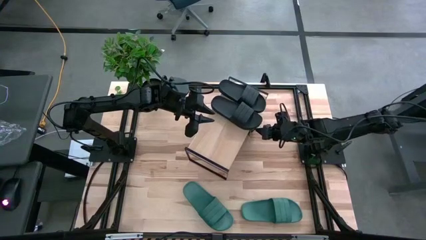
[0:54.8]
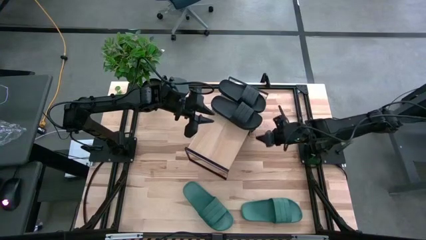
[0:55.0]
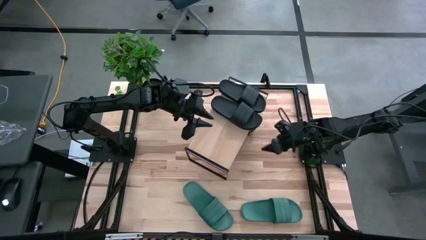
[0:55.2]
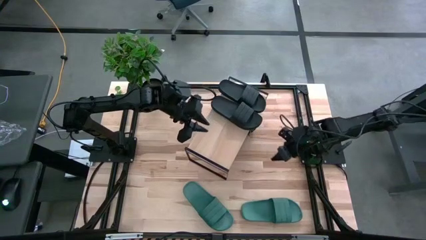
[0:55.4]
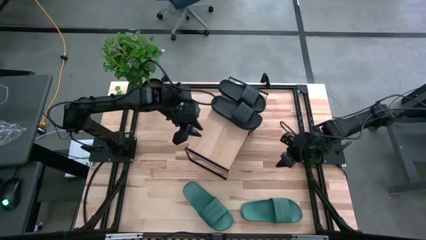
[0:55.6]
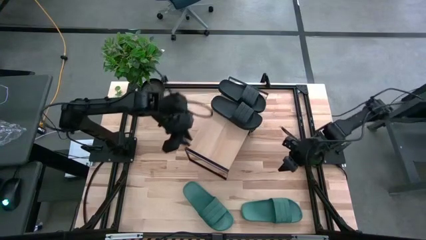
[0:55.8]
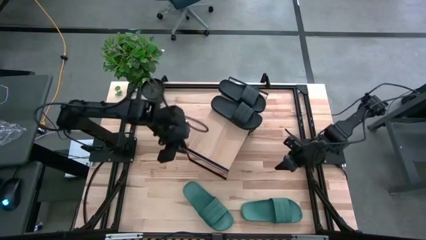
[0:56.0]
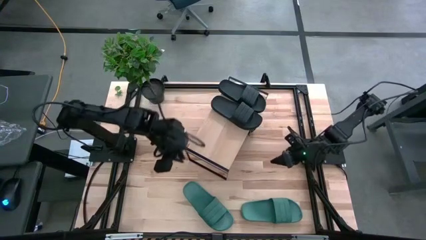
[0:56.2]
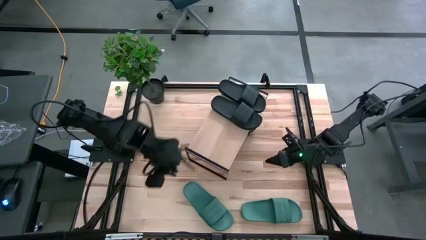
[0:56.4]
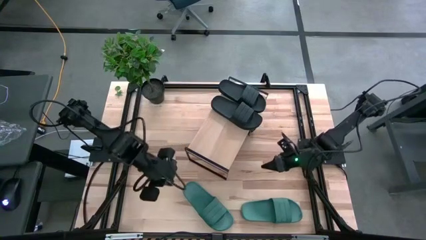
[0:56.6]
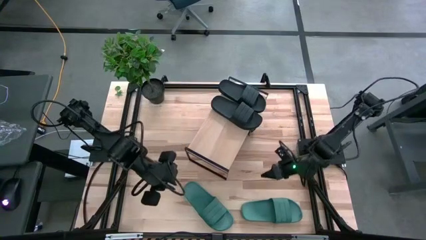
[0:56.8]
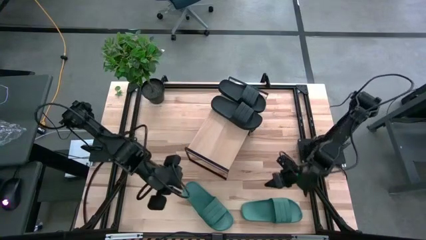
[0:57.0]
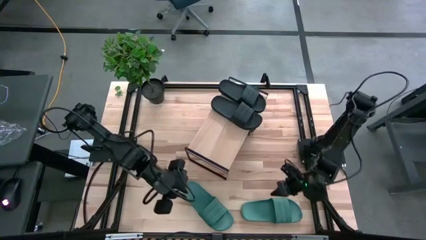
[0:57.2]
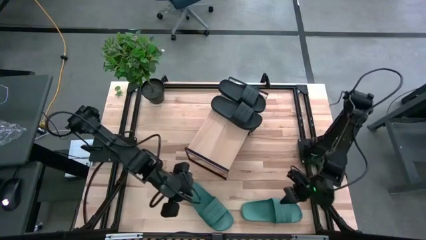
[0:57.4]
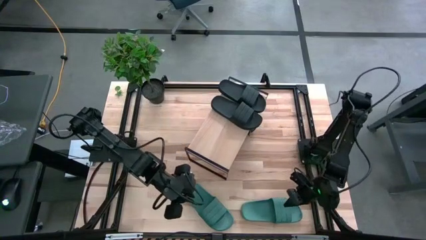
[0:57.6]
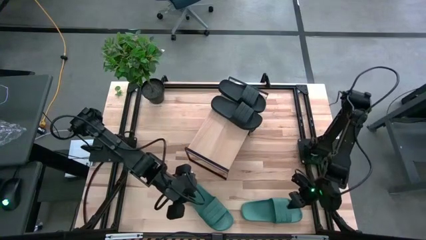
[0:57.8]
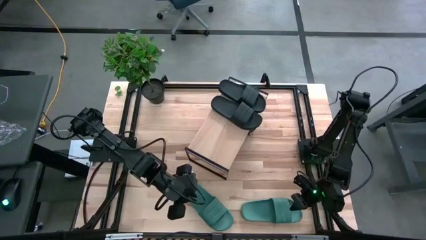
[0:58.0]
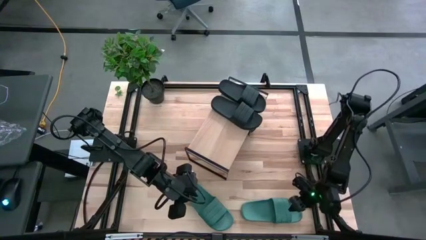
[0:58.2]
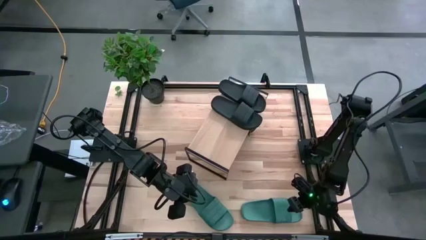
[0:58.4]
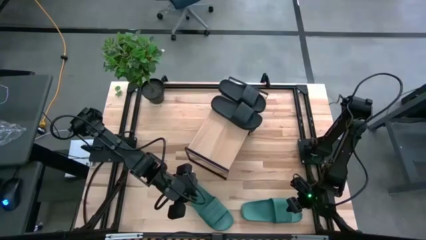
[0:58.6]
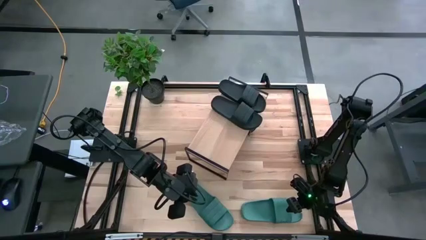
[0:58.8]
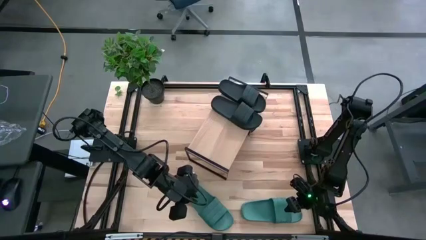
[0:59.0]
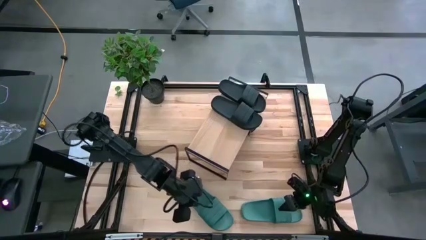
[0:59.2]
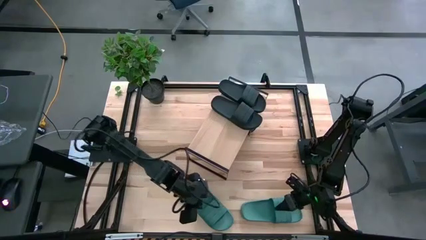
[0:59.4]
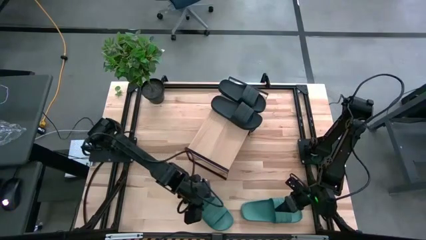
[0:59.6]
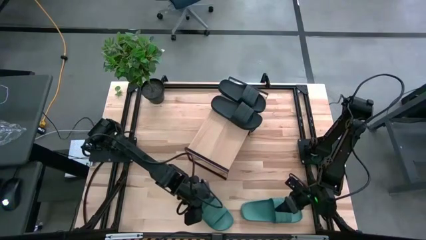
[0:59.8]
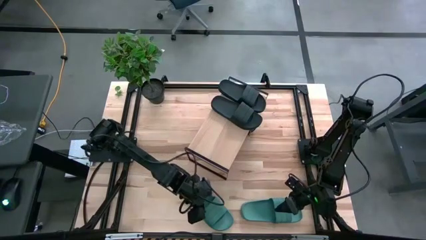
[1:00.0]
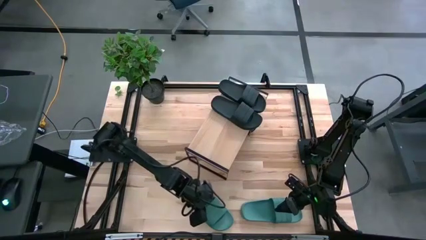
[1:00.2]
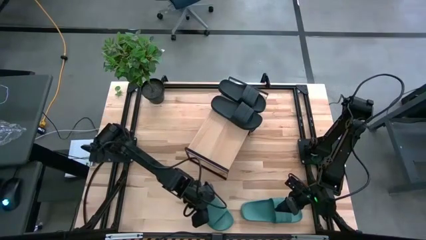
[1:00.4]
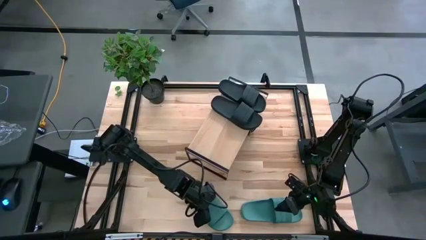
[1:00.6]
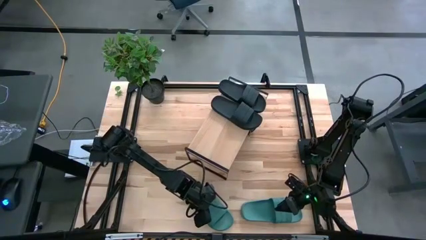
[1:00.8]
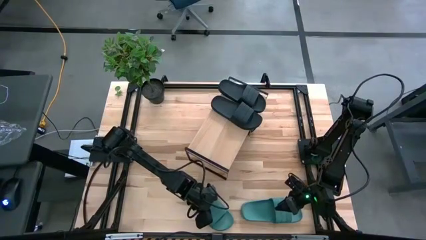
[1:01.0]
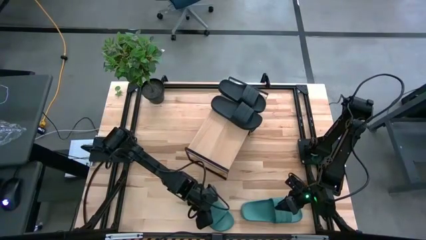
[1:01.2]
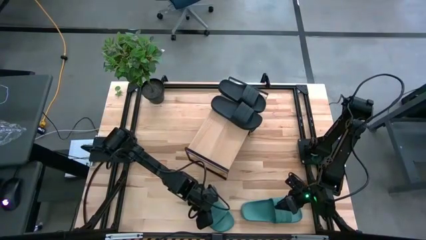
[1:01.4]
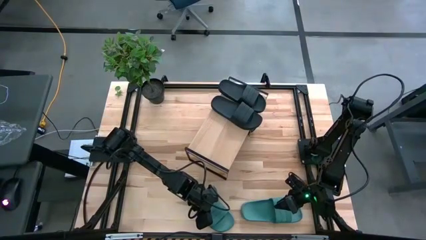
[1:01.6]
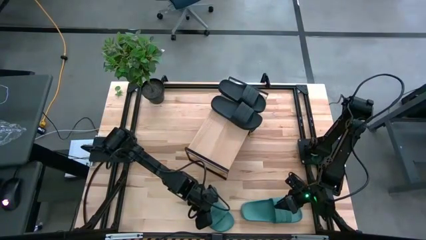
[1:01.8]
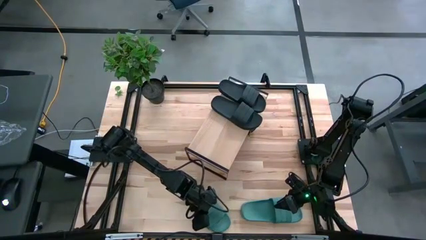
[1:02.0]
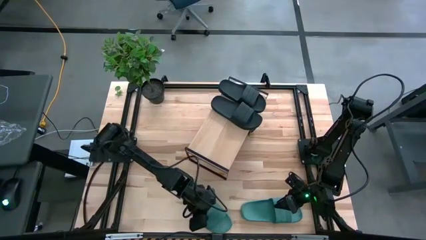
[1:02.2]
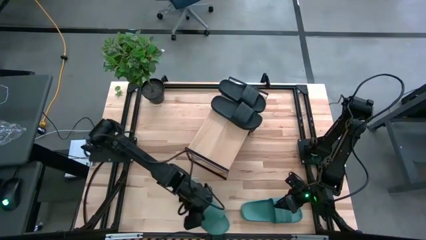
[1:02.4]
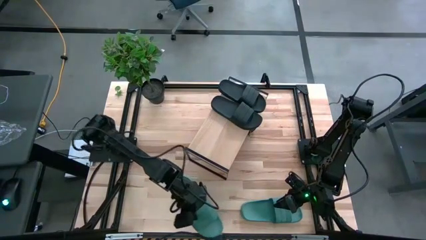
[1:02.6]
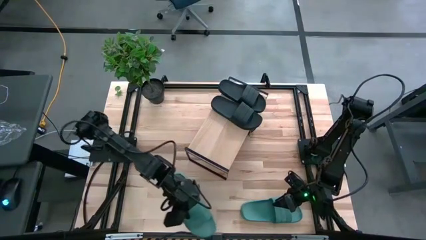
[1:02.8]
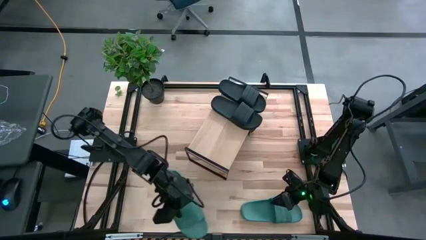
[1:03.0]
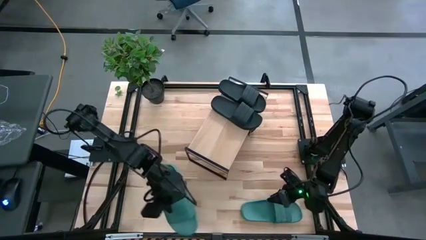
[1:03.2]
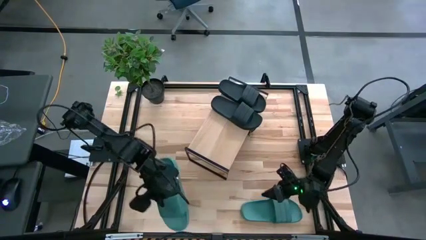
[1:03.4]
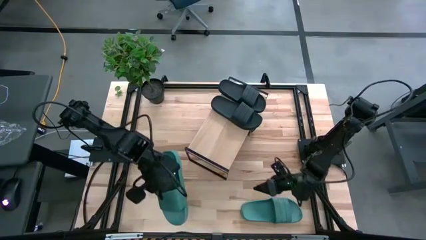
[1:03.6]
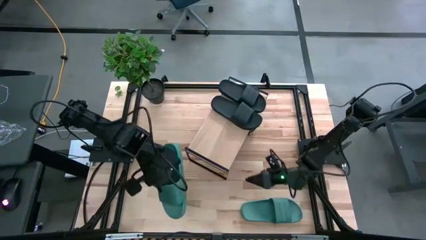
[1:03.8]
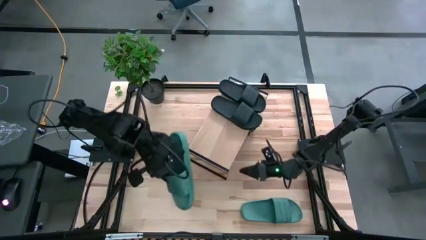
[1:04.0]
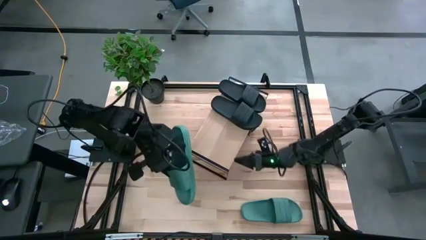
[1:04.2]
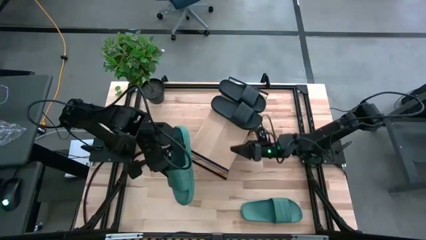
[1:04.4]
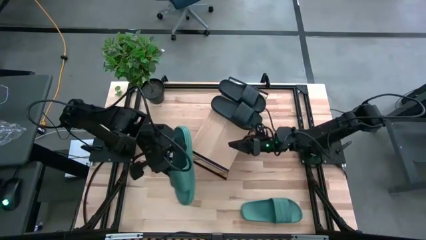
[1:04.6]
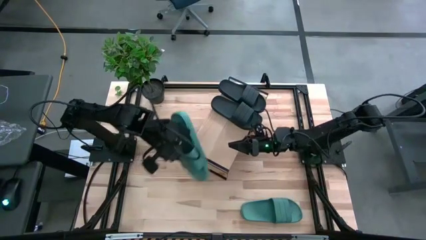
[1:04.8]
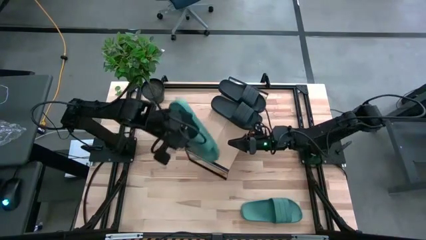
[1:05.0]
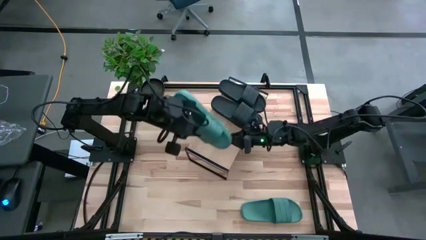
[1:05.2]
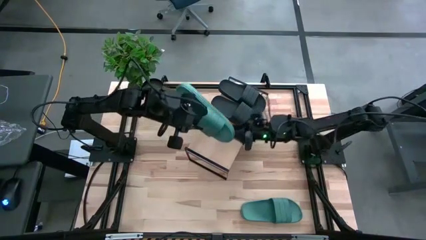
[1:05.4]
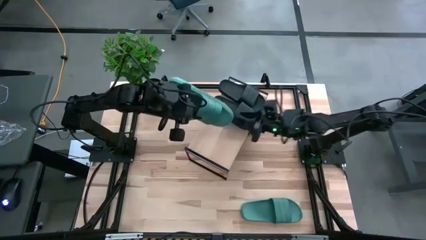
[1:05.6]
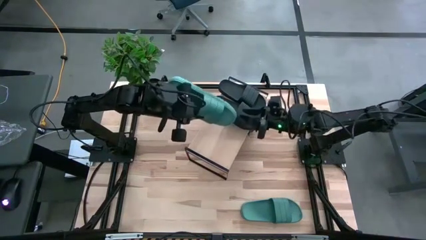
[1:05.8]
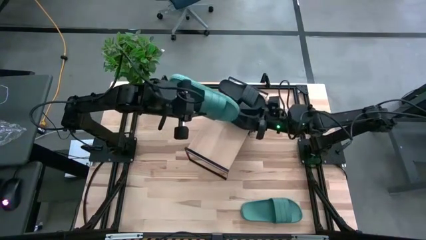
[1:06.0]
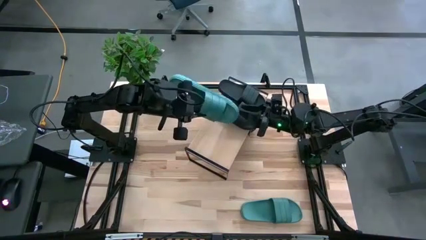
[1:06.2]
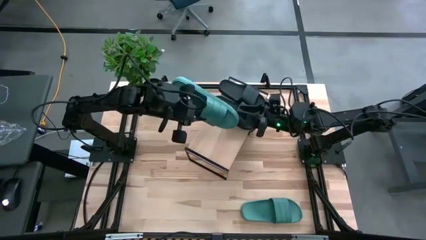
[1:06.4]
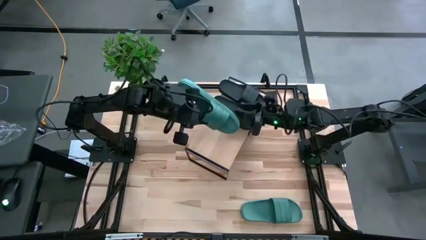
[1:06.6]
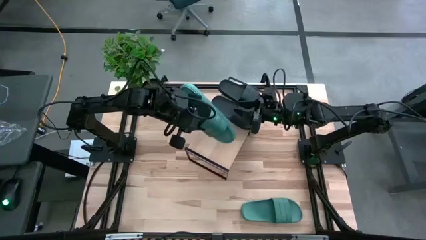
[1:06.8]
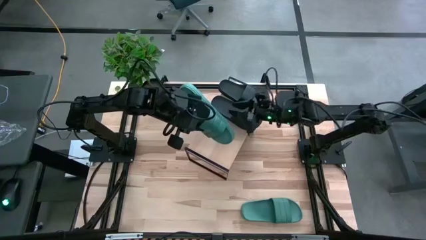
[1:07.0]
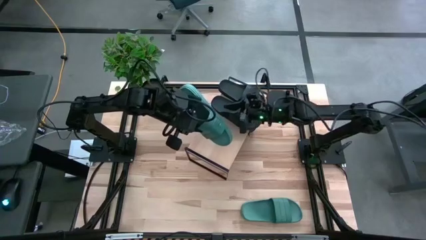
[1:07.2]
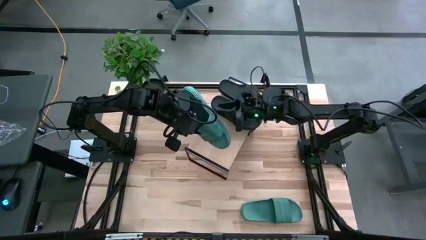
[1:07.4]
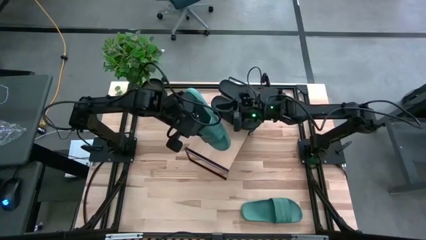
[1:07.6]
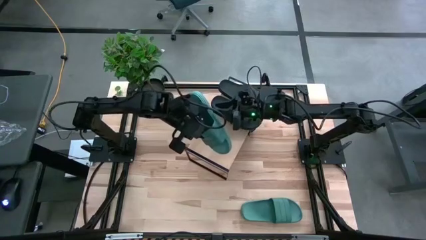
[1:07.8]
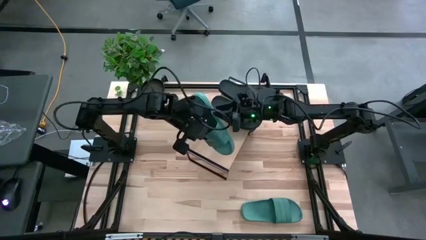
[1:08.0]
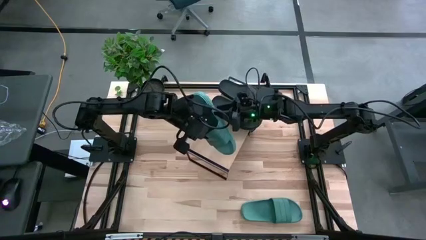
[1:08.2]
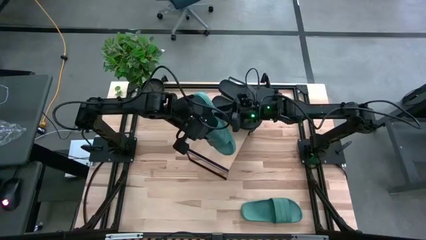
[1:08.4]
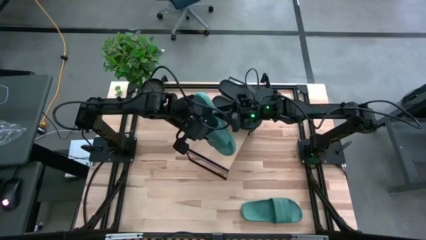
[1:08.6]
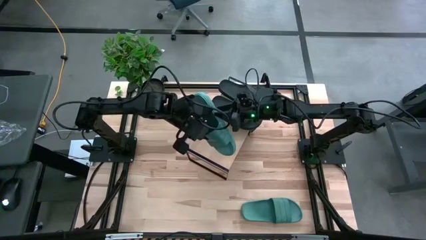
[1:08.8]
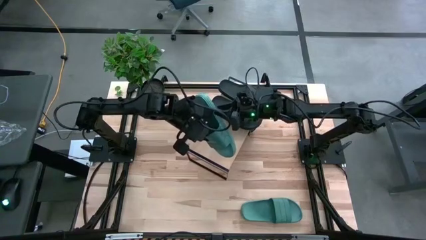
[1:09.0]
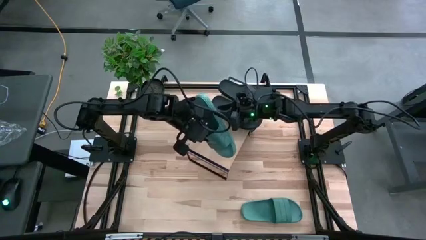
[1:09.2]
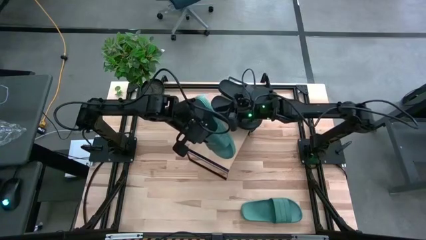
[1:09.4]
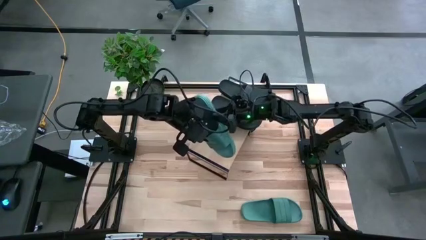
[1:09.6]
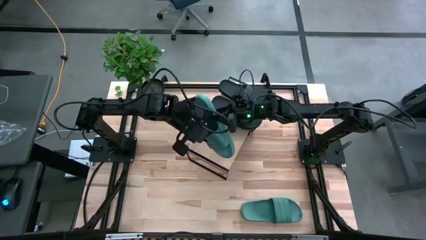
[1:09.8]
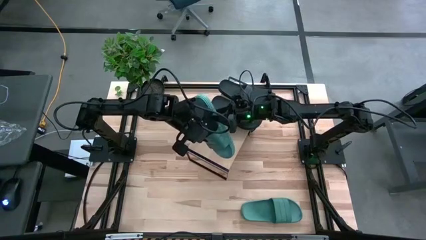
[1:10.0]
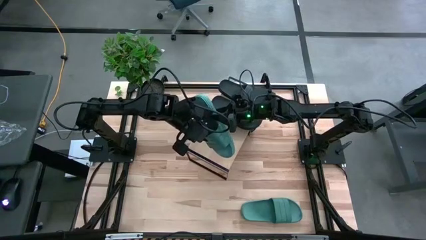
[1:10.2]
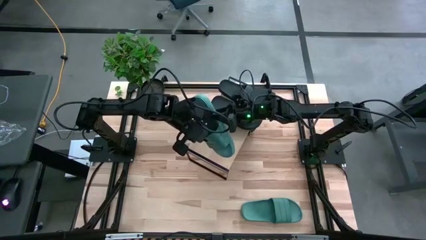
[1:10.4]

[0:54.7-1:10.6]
Task: Pick and place slides into the shelf
Put the left green slipper on the shelf

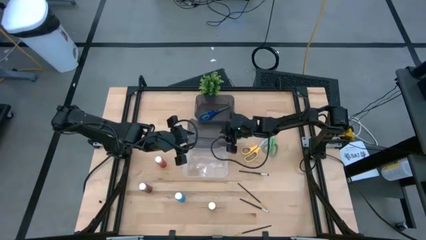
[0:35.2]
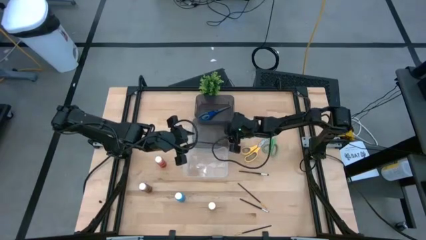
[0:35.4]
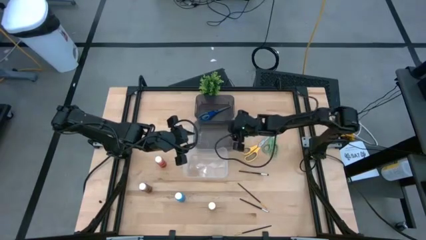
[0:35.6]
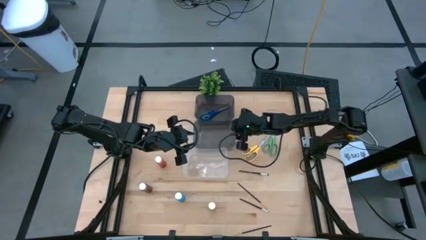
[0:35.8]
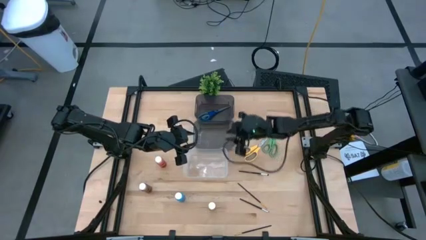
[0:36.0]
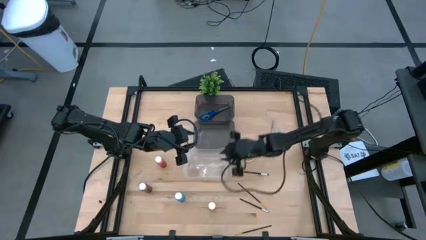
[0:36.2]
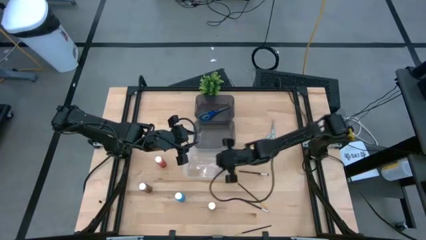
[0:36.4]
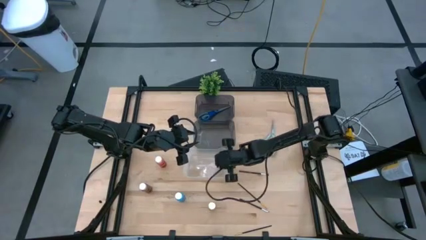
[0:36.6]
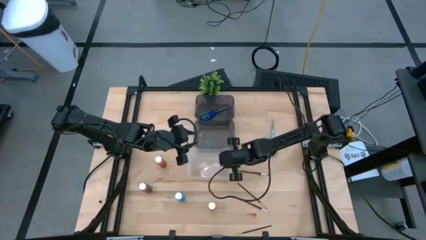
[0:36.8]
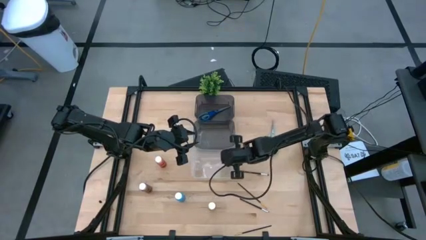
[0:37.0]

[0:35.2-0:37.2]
Task: Pick & Place Paint Supplies
Adjust the white bins
